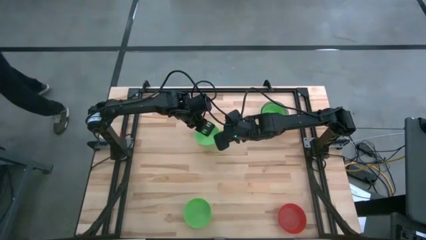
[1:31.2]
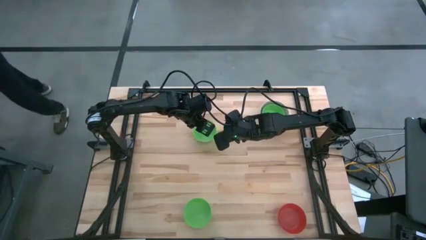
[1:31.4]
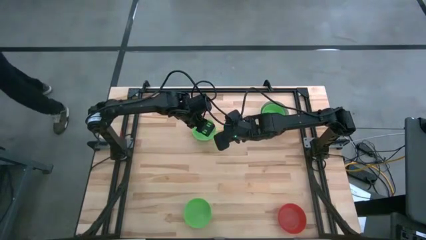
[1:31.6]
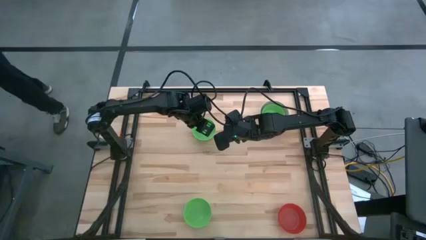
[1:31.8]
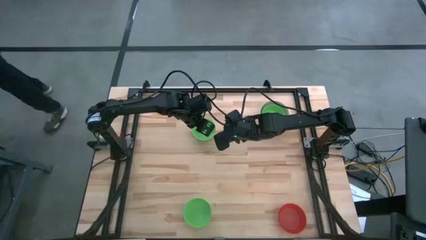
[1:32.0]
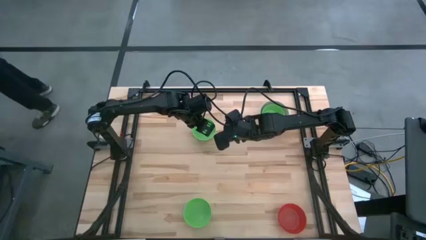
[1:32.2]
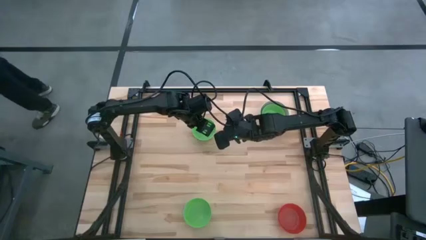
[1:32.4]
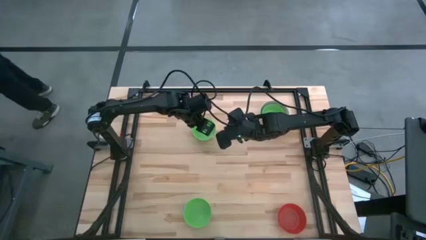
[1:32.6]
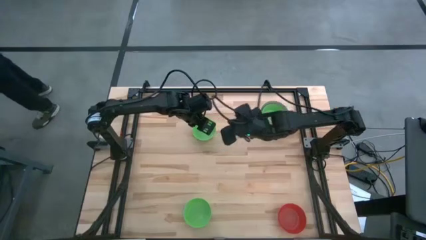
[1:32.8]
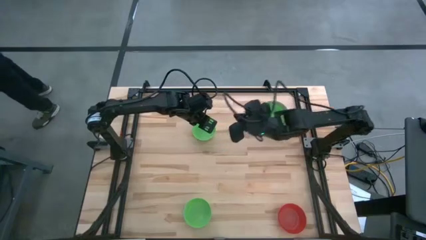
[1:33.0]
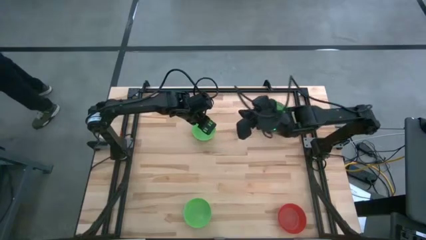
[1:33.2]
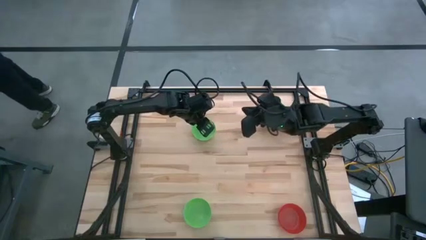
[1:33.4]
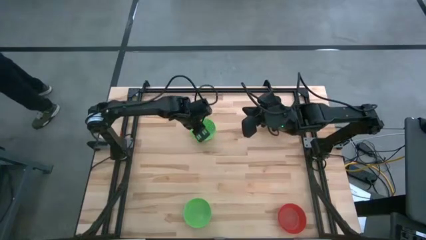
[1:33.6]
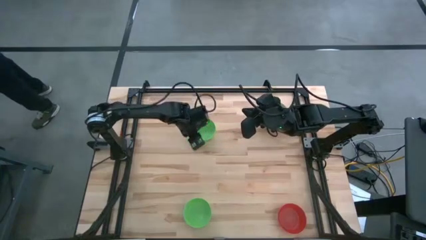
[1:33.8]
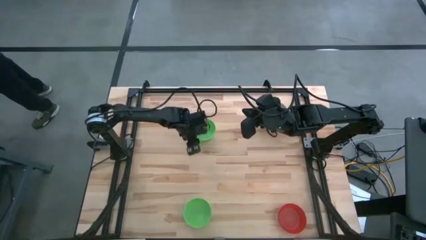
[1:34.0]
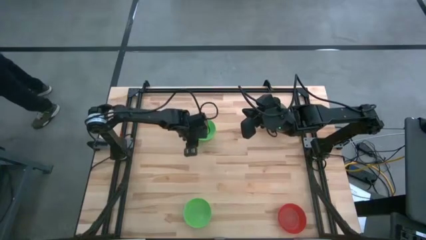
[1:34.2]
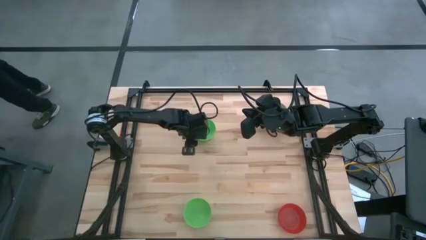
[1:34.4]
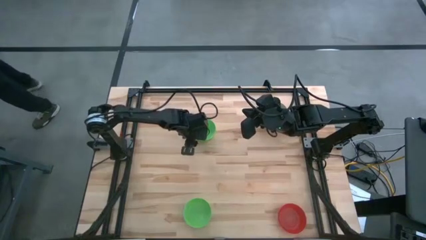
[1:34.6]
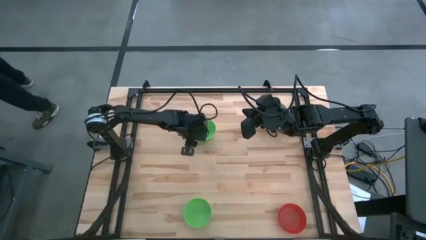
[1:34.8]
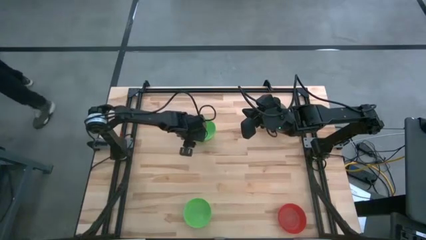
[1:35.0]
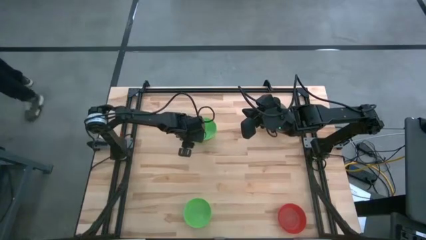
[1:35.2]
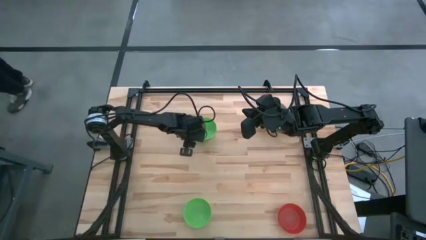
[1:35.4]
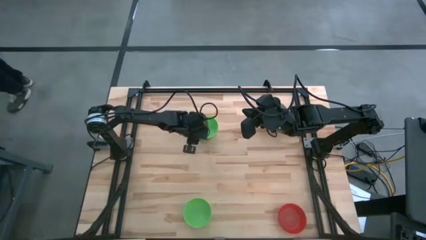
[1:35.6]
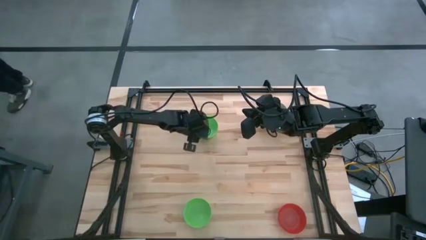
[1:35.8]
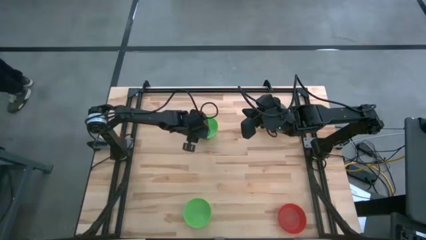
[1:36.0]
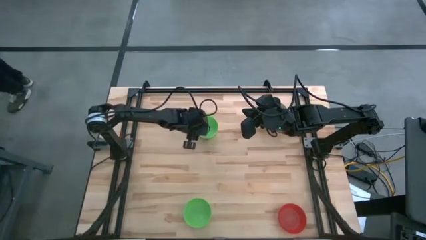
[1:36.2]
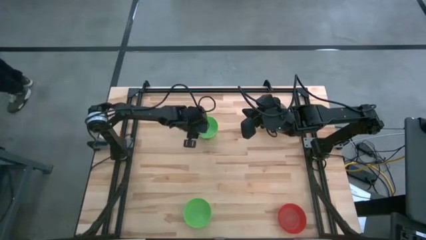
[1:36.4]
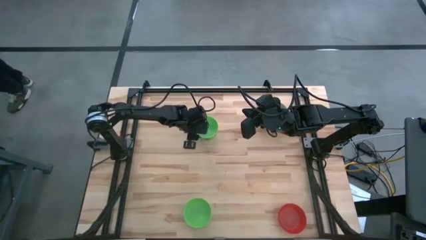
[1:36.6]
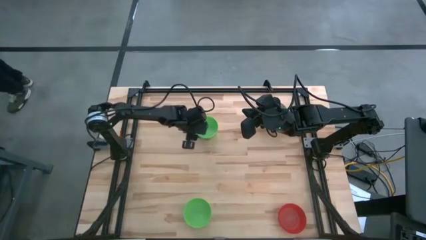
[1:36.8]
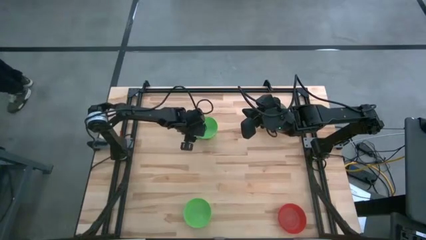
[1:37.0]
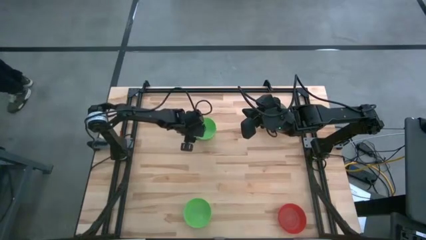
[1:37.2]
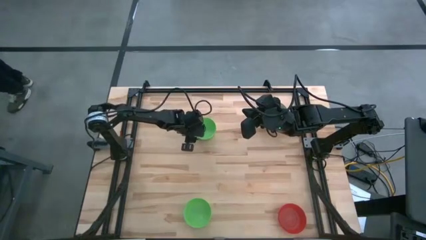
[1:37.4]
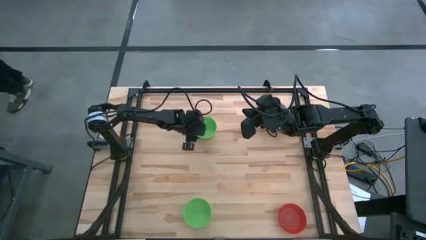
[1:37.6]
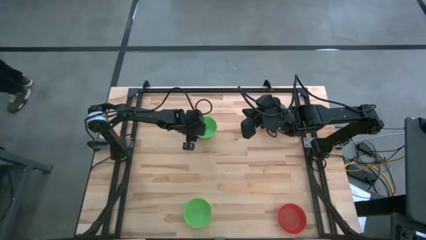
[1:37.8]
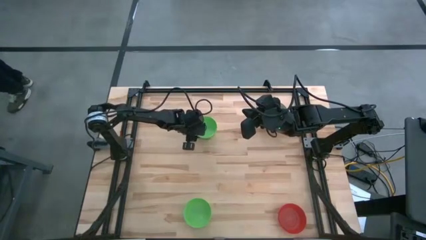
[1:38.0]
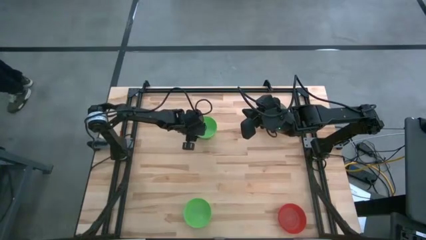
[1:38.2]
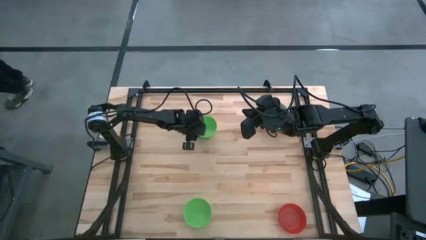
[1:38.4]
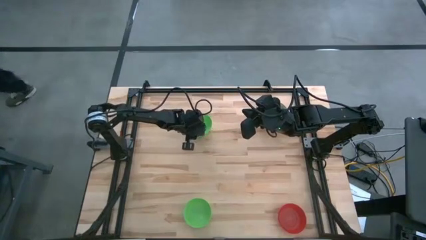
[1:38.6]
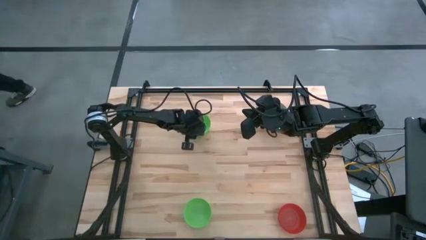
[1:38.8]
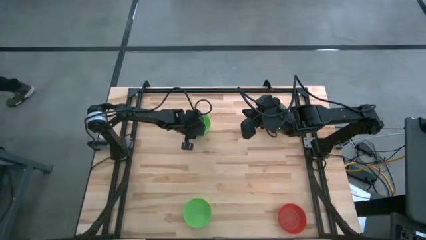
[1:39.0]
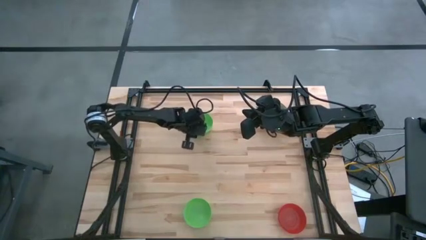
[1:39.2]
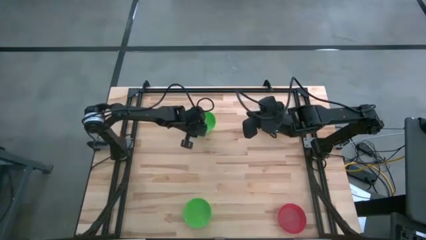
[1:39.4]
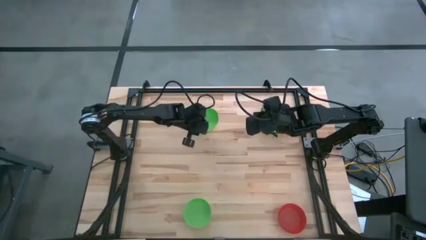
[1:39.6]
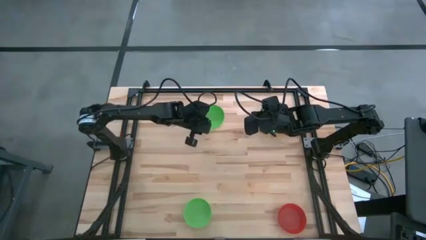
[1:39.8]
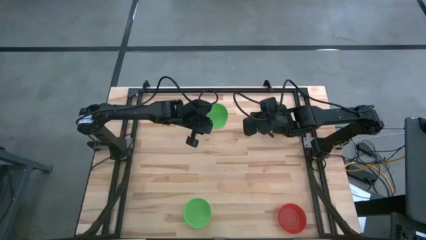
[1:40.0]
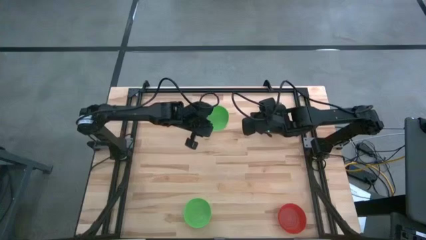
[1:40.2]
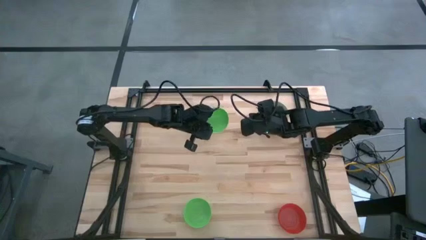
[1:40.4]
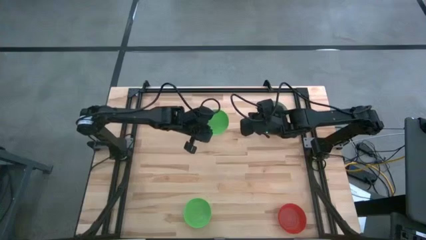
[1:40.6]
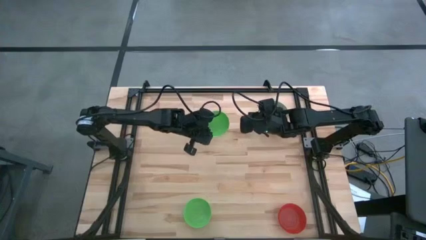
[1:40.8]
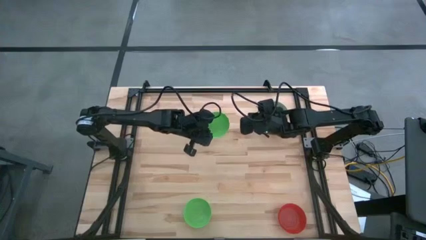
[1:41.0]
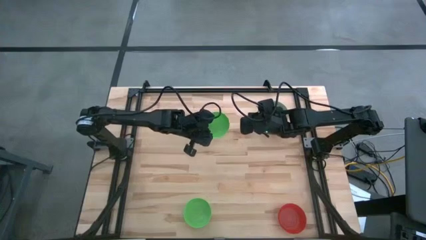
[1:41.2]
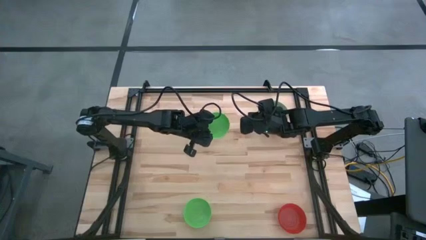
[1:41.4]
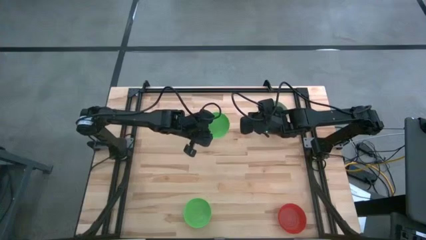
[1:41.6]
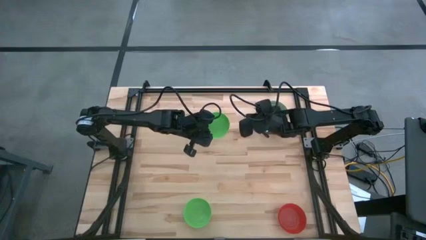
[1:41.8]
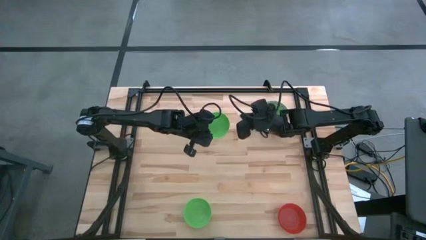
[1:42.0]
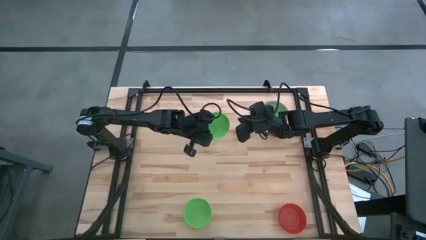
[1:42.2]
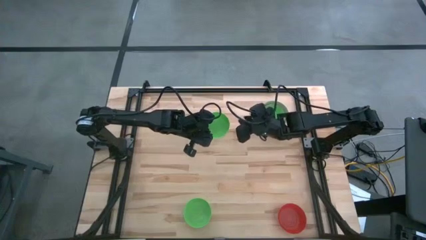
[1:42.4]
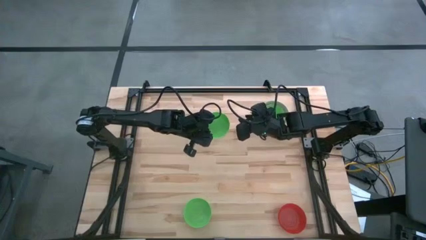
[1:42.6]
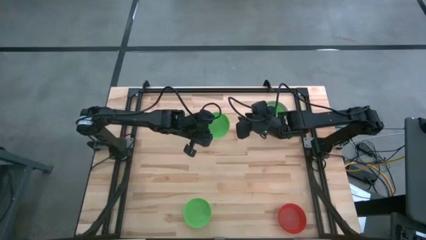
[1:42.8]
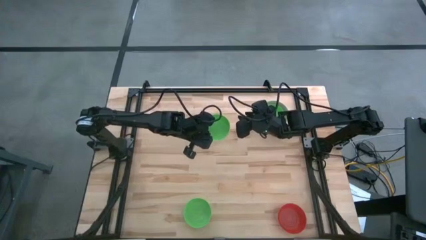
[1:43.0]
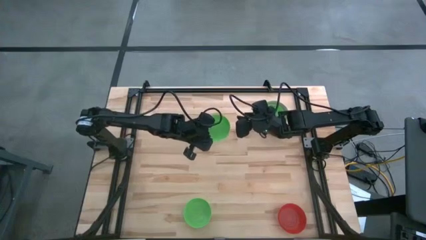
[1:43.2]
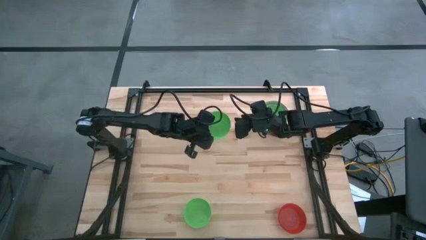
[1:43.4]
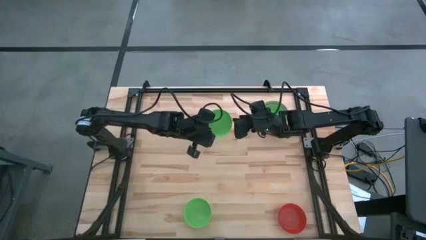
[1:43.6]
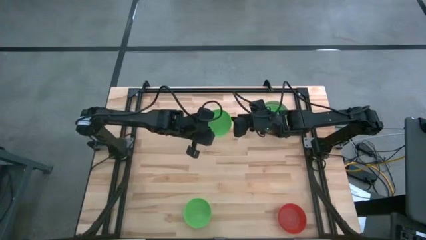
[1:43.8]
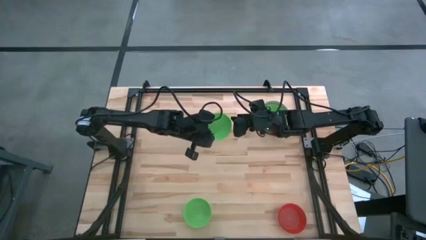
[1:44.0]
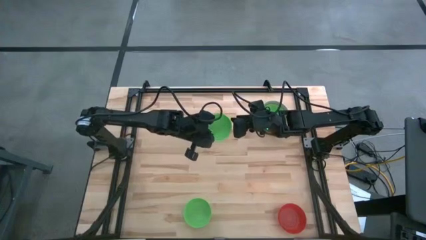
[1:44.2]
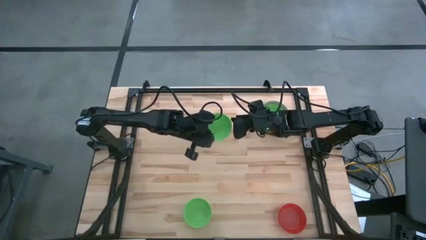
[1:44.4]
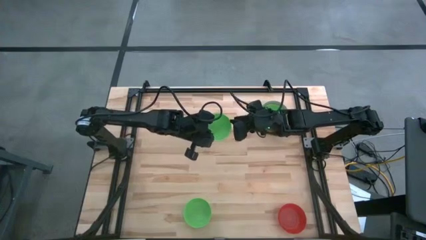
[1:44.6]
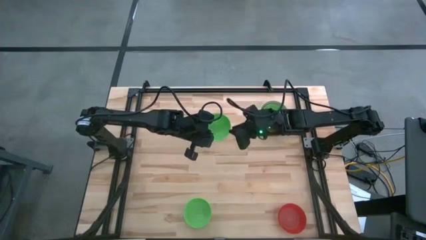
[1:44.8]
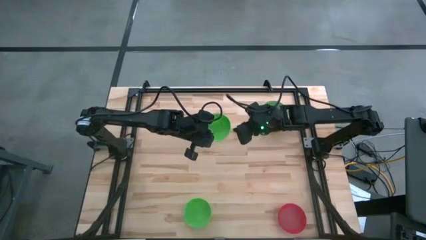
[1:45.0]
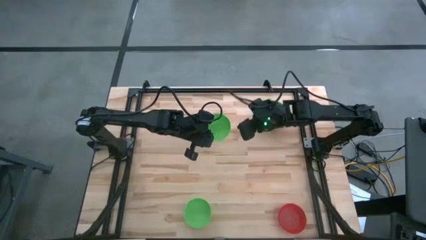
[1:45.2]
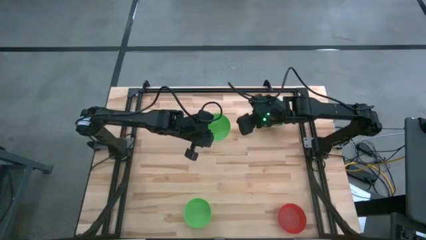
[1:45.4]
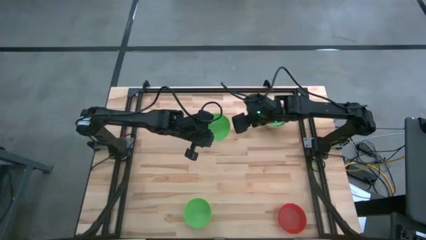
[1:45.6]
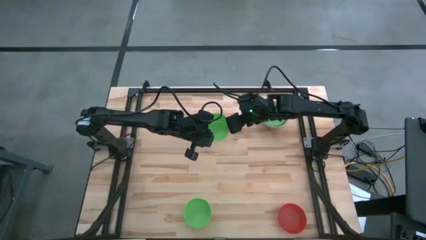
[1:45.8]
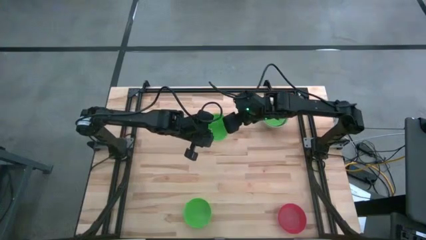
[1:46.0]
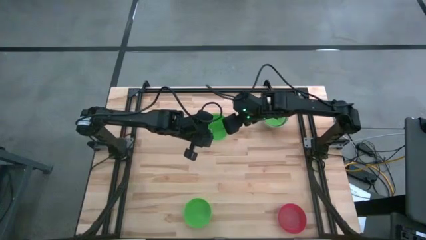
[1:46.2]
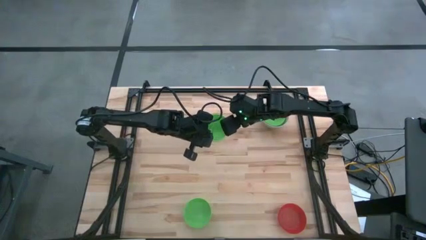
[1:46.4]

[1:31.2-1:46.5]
Stack the top green bowl on top of the green bowl
